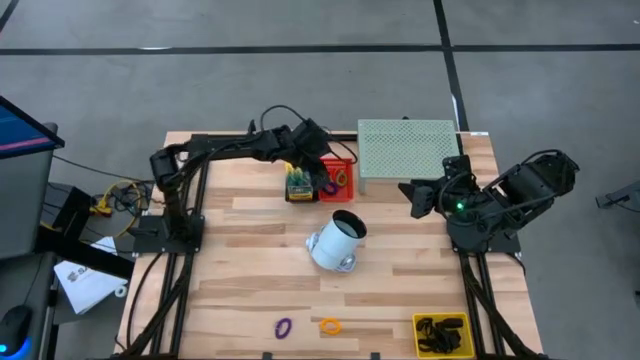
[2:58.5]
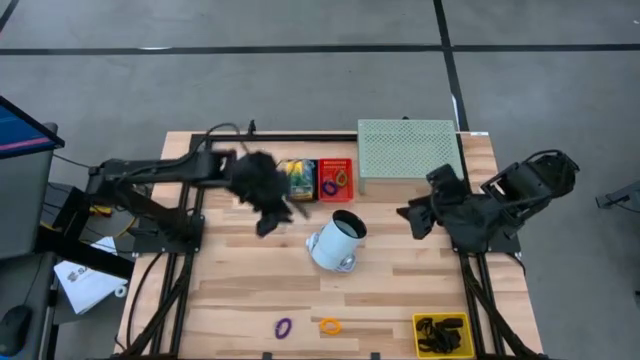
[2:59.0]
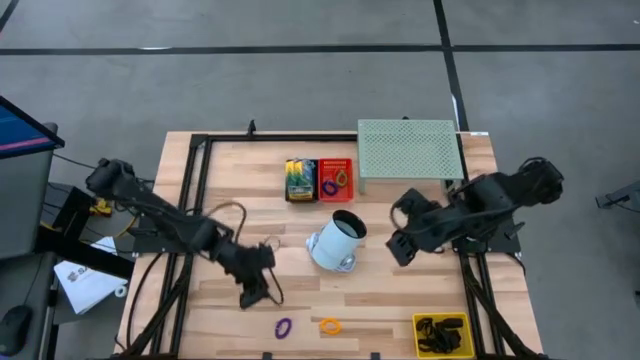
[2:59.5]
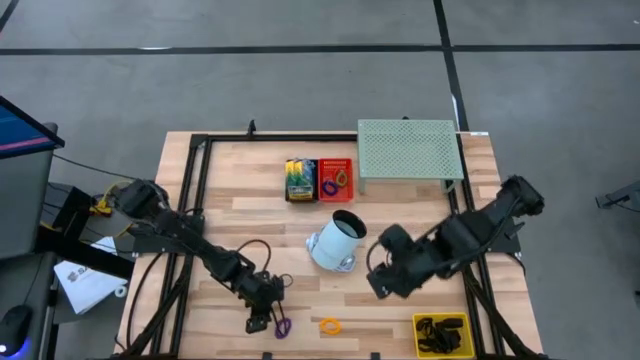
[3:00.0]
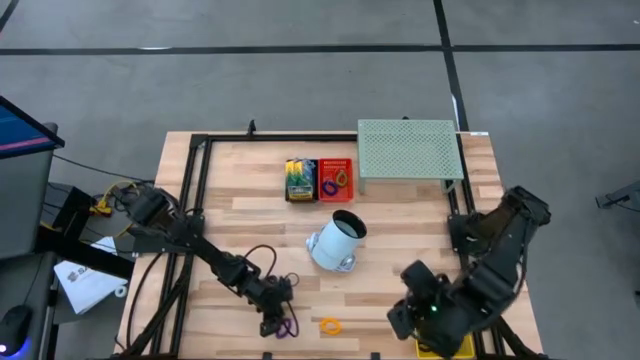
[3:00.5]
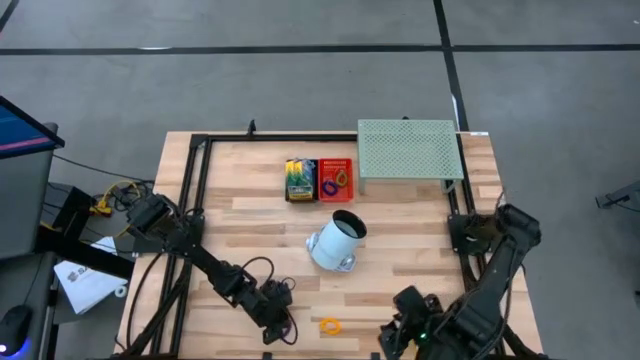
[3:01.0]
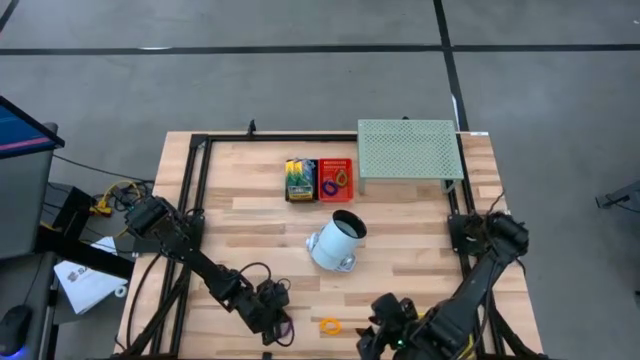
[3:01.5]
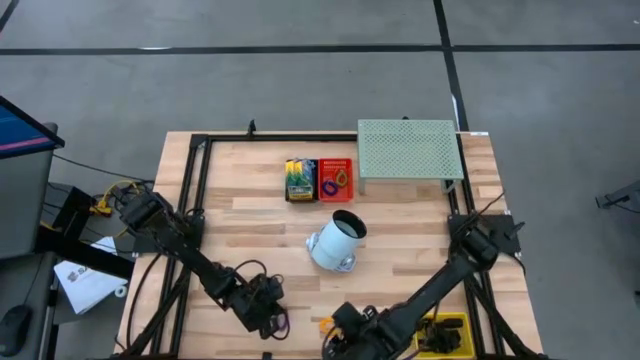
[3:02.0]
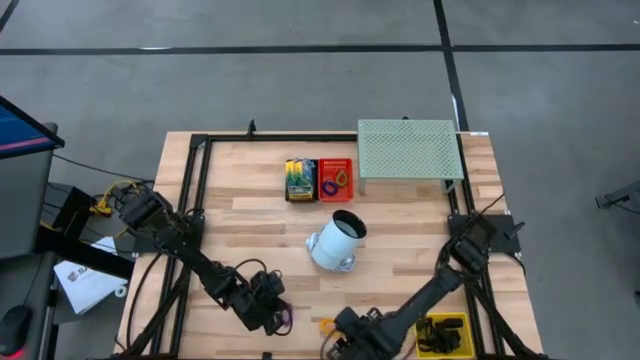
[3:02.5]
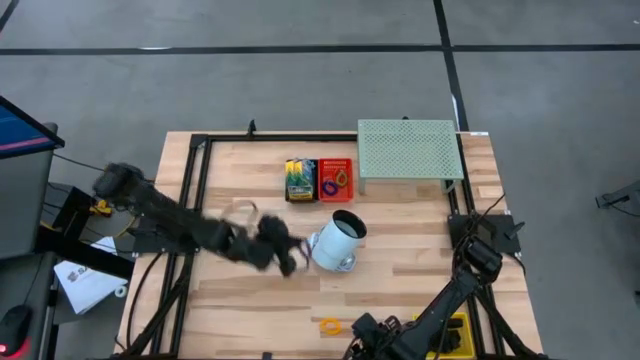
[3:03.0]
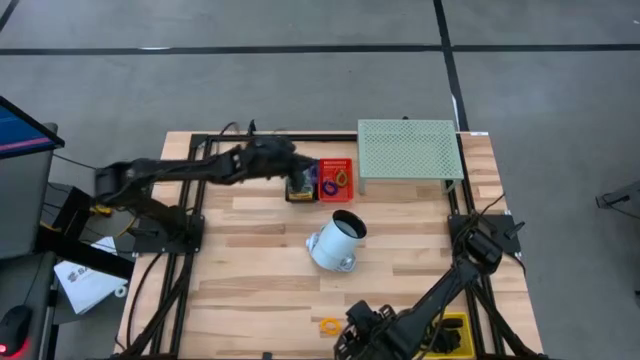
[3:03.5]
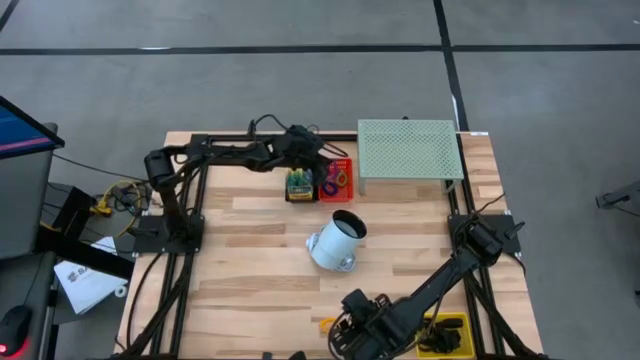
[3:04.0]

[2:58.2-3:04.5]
Task: Pick & Place Office Desk Supplies
Put the purple spring rubber band into the red bin

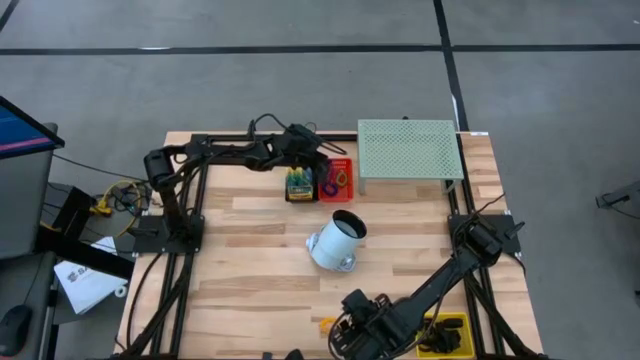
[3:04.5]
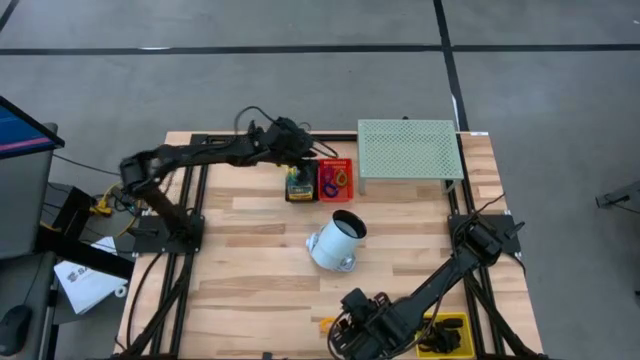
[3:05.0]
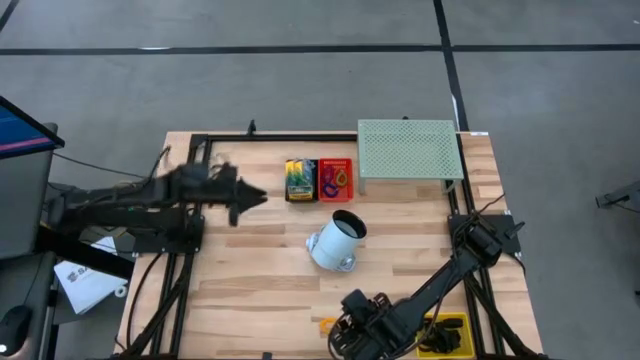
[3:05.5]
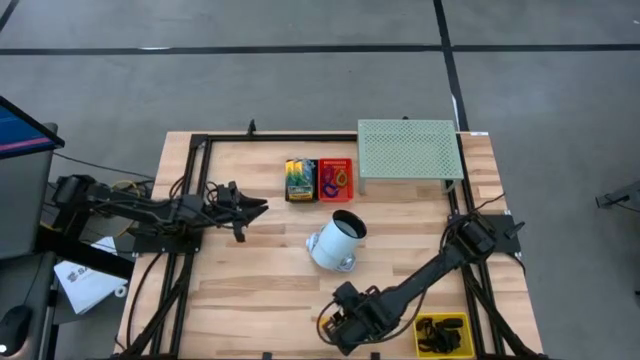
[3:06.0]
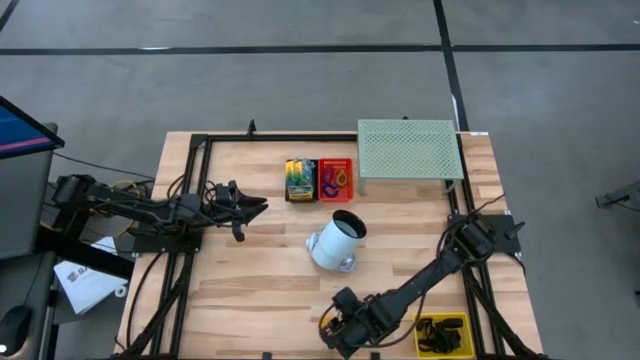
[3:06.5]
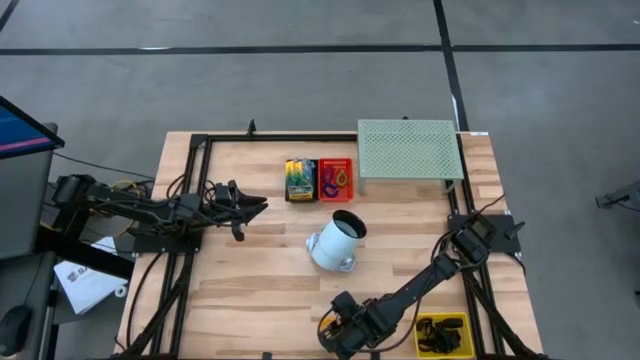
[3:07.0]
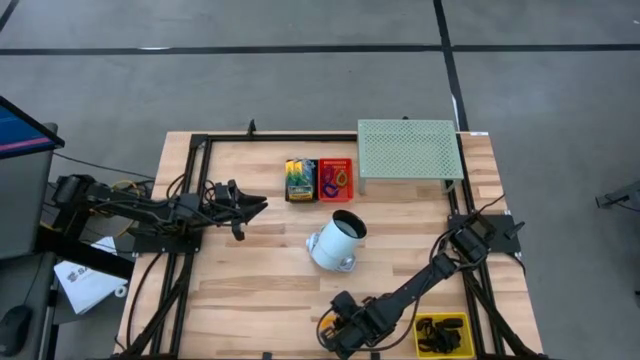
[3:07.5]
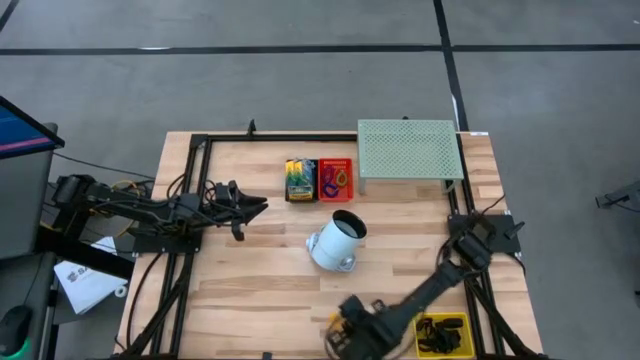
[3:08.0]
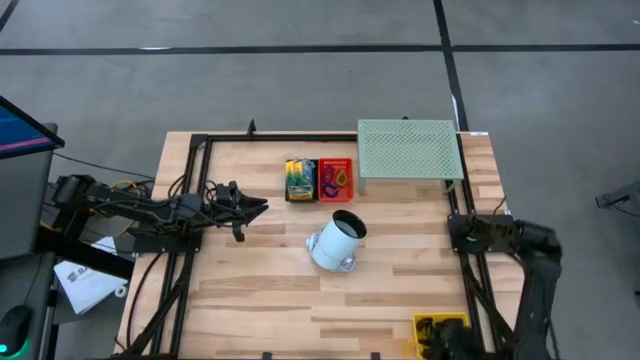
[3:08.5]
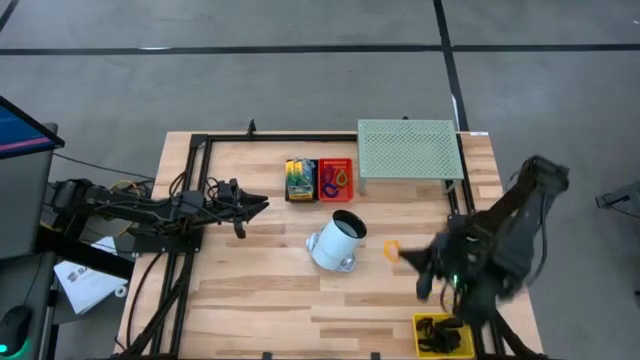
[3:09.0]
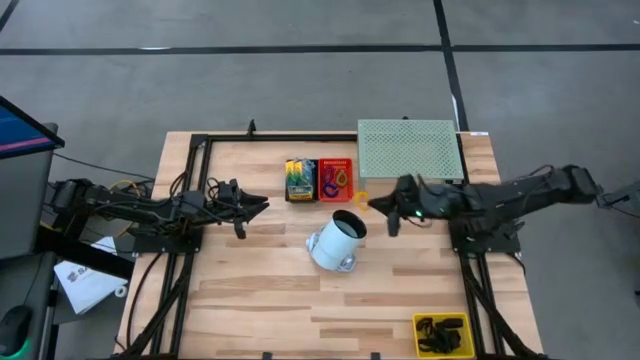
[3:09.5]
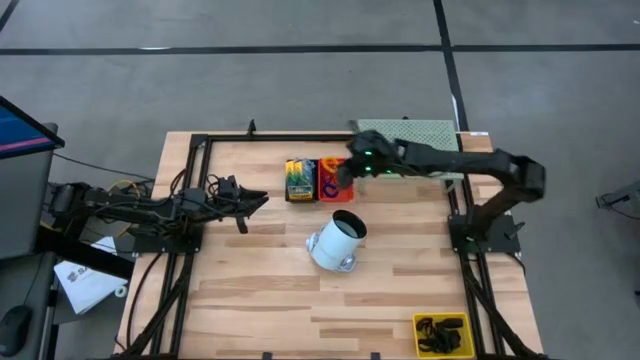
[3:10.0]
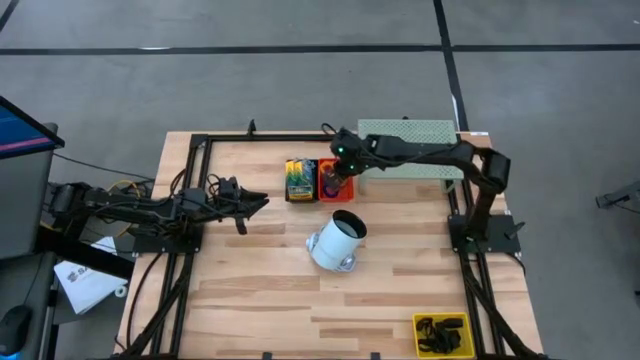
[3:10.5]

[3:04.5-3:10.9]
Put the yellow spring rubber band into the red bin

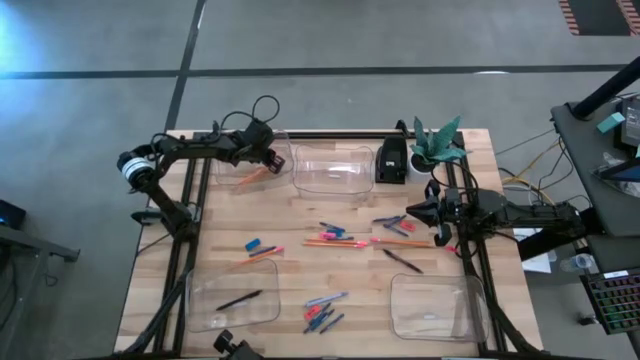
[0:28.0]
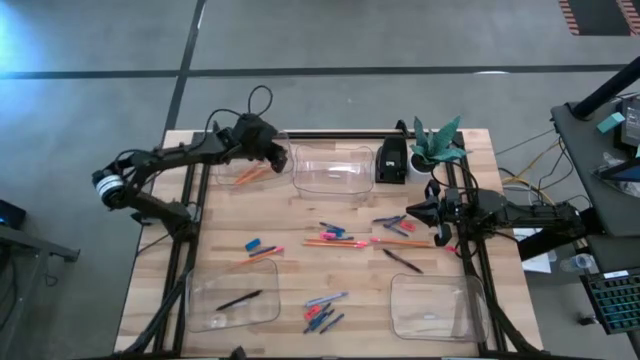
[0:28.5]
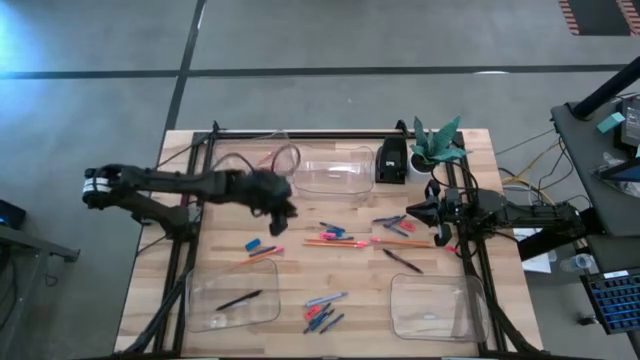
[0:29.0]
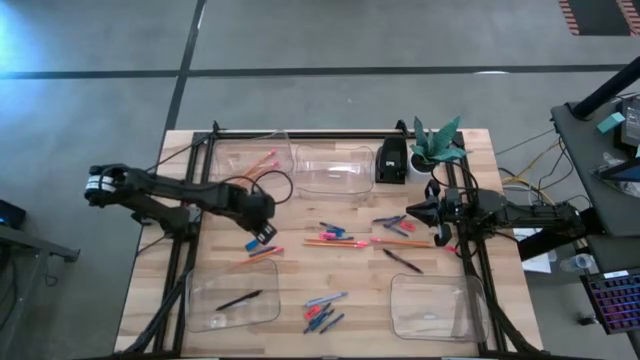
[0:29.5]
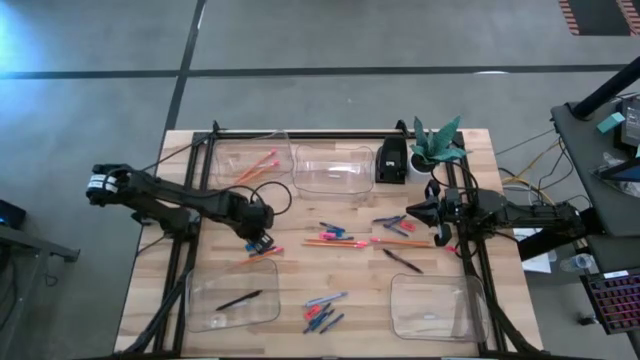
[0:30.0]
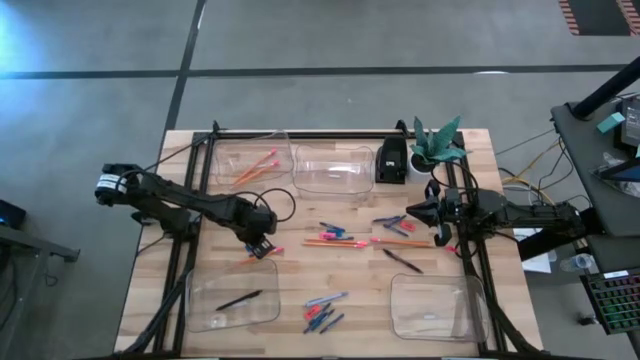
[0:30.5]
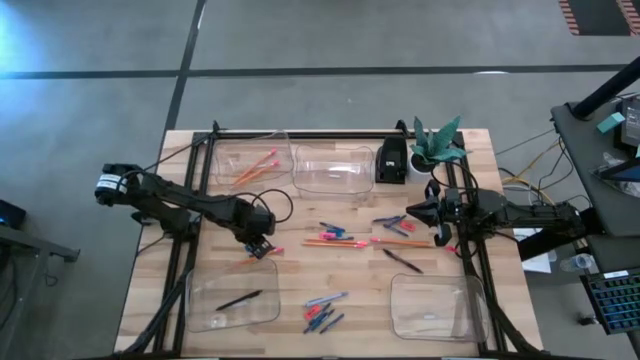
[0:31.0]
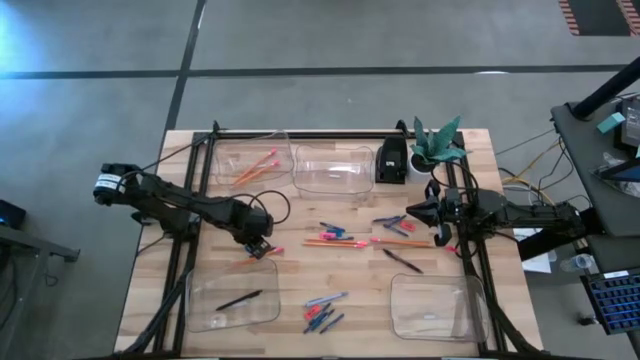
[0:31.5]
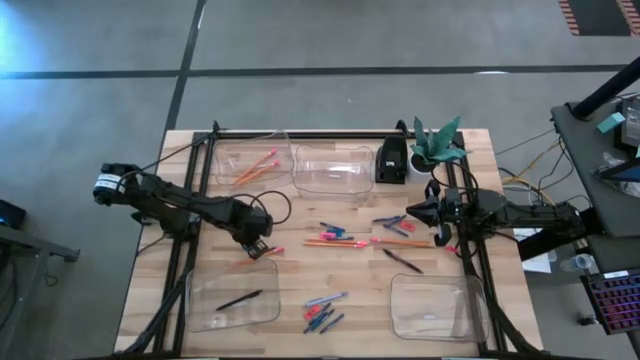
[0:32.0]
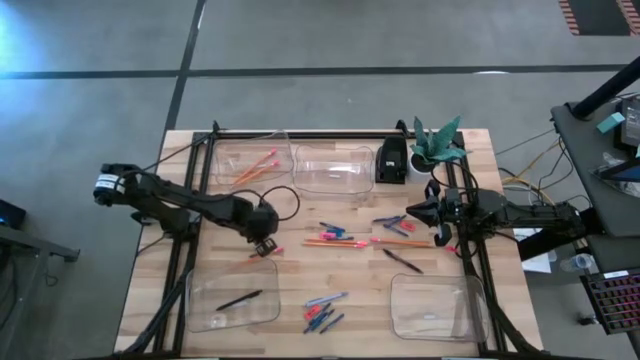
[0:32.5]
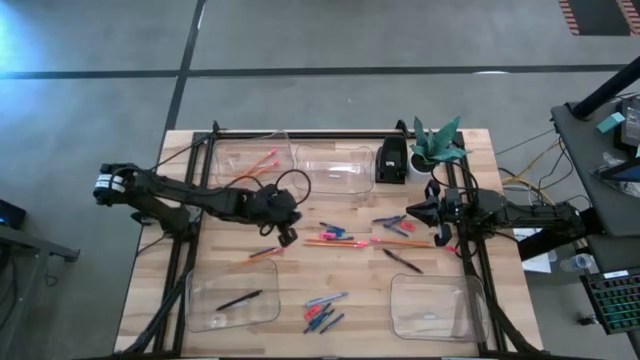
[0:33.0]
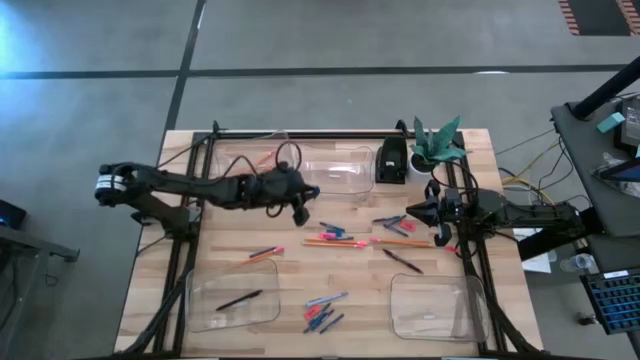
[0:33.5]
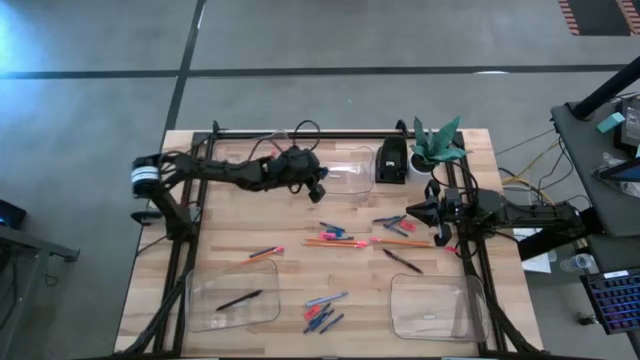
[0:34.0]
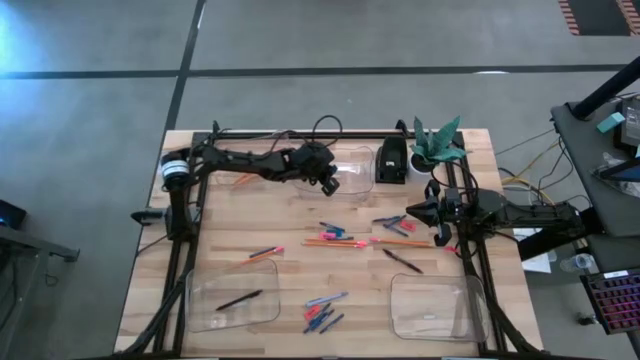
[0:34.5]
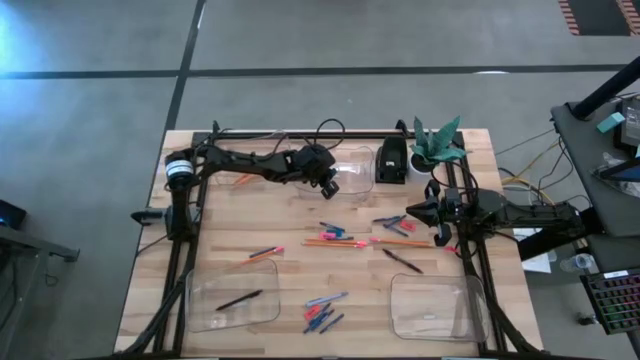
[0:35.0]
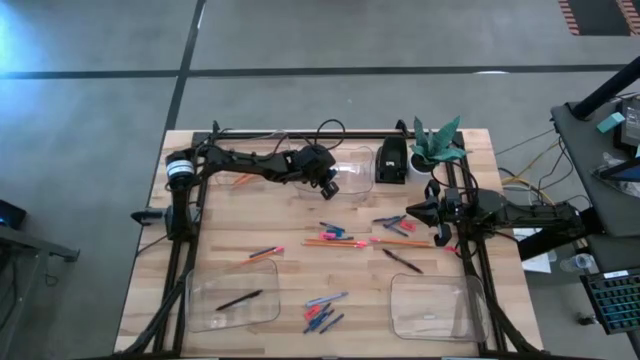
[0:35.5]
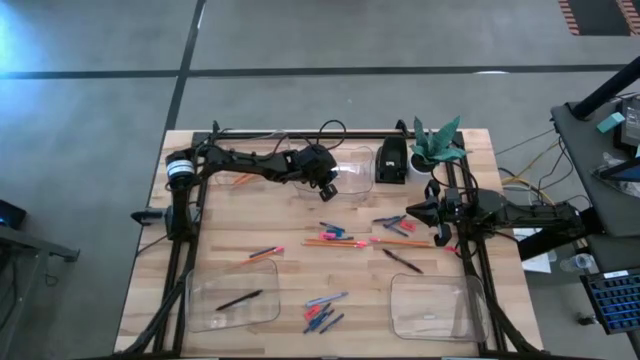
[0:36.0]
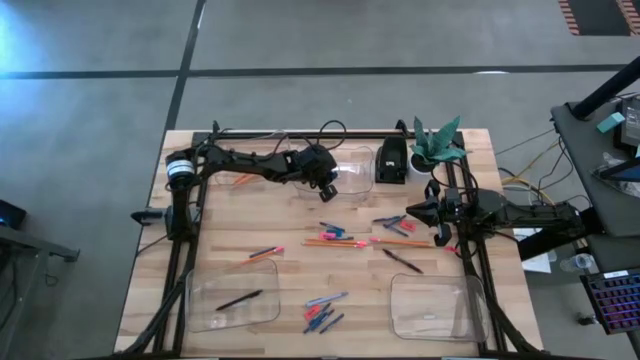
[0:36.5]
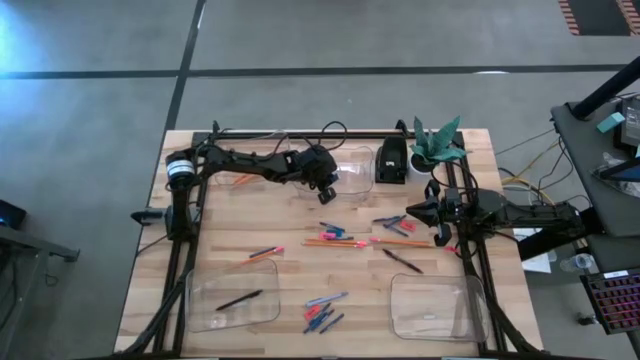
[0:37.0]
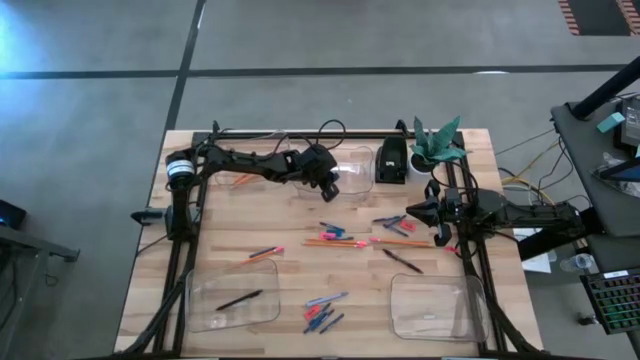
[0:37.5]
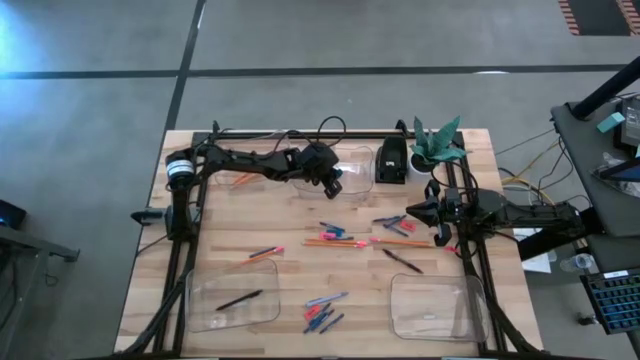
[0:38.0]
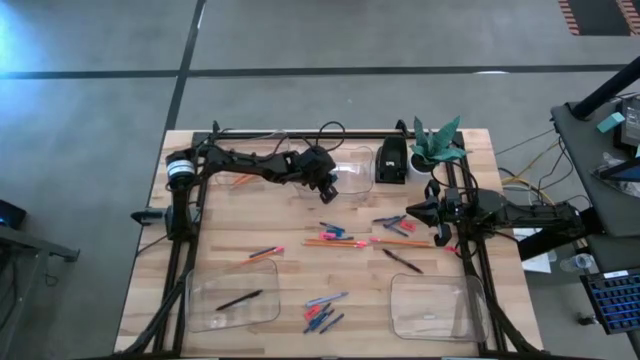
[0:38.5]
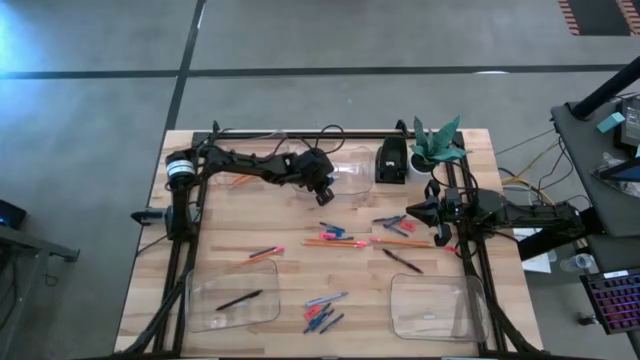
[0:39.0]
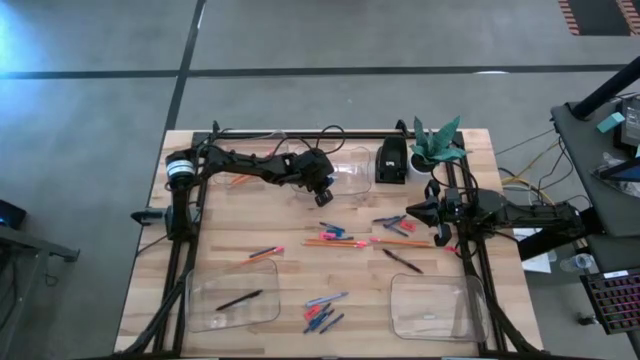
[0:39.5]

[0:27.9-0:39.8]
Task: Sort crayons/erasers/pens/pencils in bins
Put the blue eraser into the top right transparent bin
